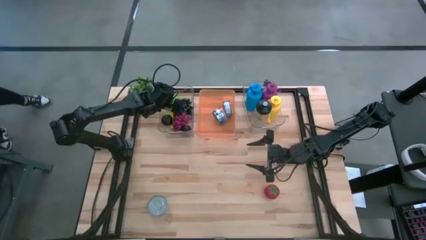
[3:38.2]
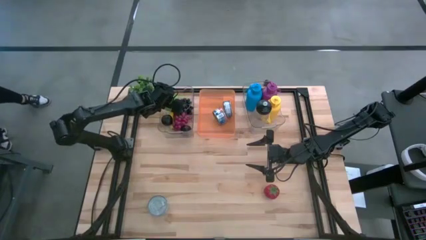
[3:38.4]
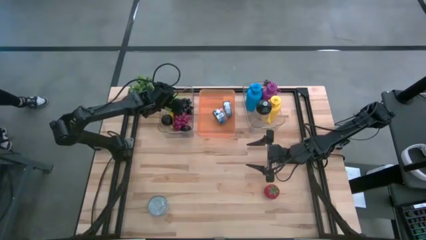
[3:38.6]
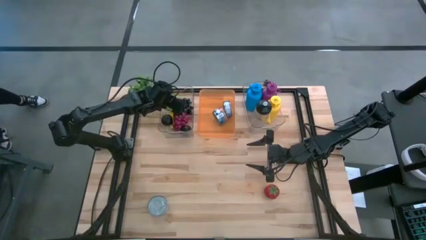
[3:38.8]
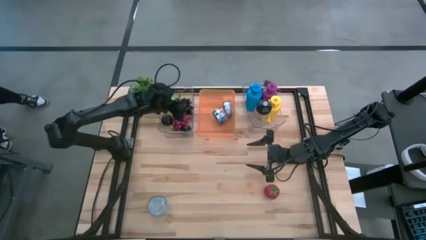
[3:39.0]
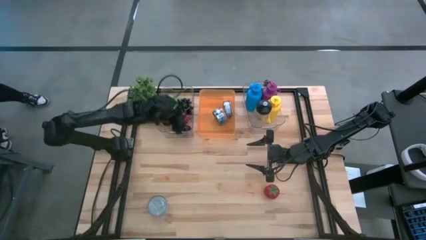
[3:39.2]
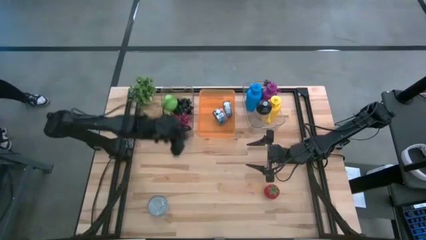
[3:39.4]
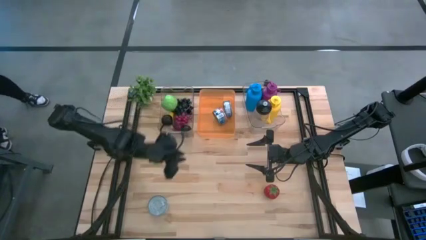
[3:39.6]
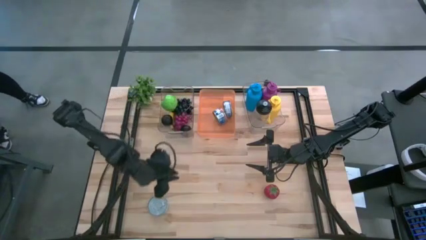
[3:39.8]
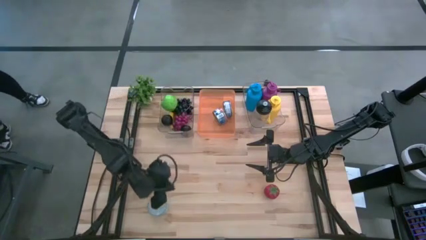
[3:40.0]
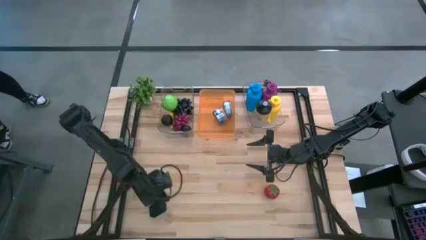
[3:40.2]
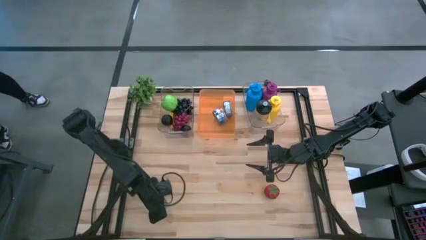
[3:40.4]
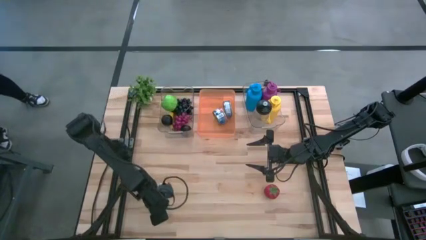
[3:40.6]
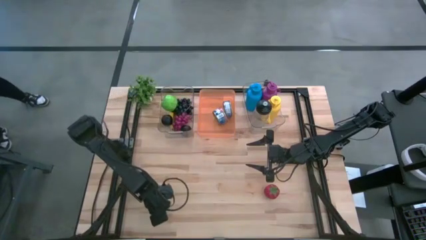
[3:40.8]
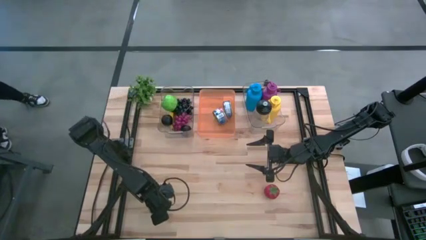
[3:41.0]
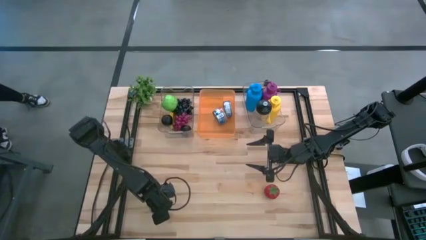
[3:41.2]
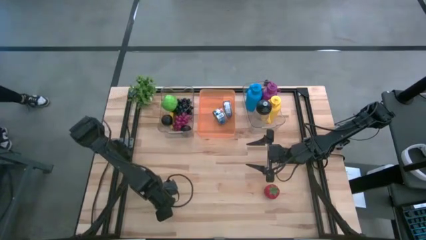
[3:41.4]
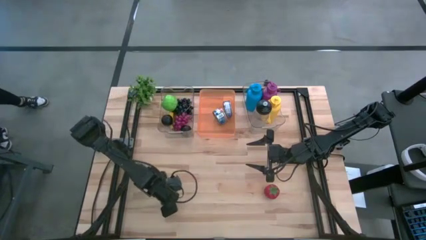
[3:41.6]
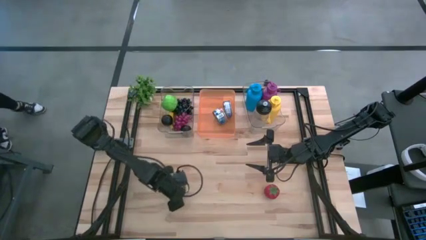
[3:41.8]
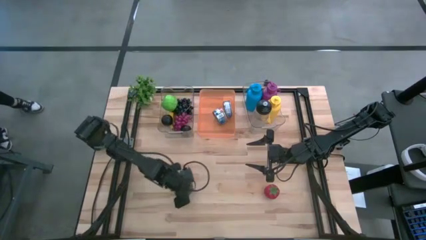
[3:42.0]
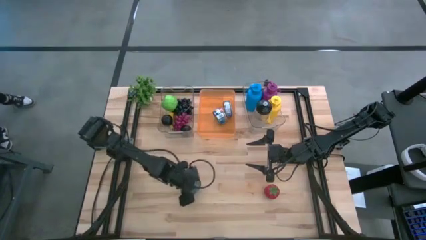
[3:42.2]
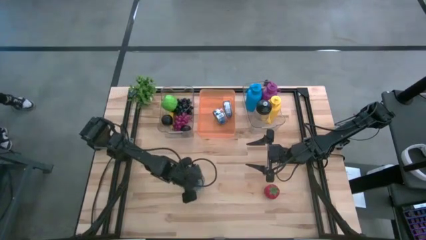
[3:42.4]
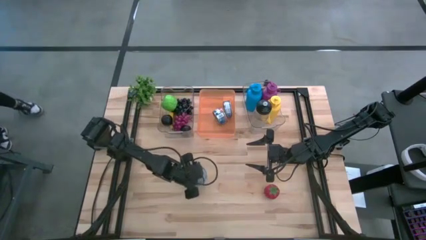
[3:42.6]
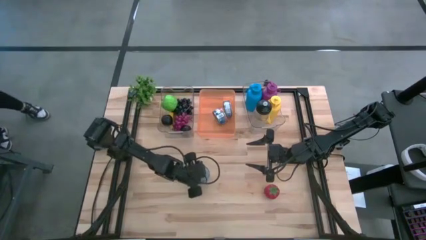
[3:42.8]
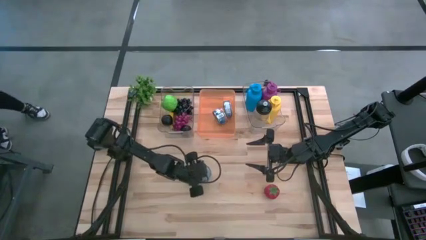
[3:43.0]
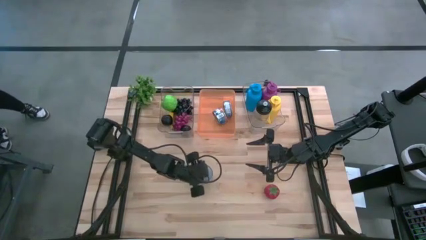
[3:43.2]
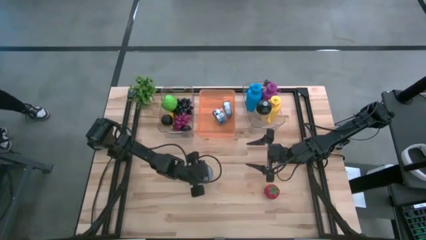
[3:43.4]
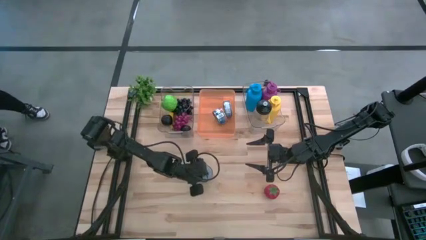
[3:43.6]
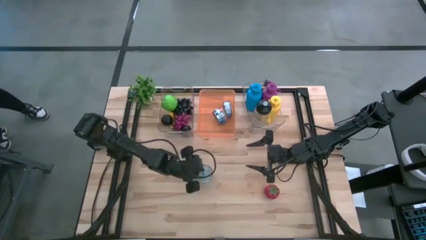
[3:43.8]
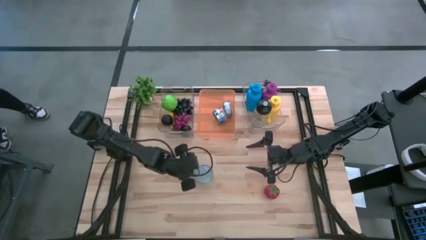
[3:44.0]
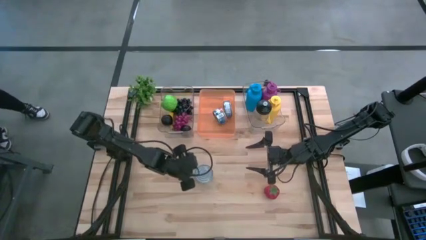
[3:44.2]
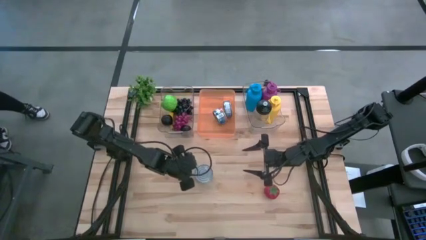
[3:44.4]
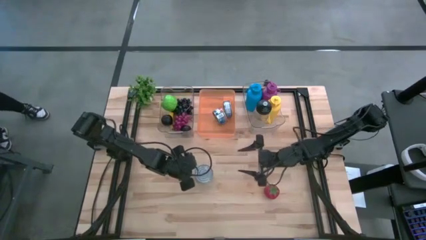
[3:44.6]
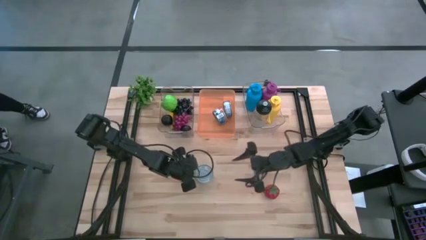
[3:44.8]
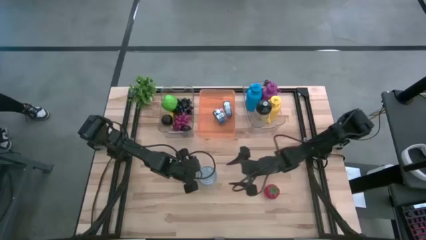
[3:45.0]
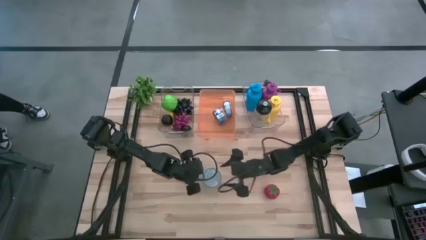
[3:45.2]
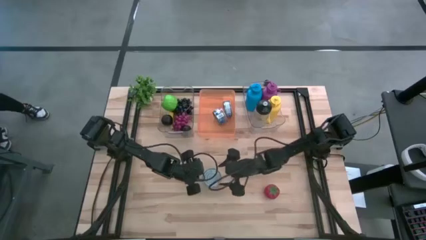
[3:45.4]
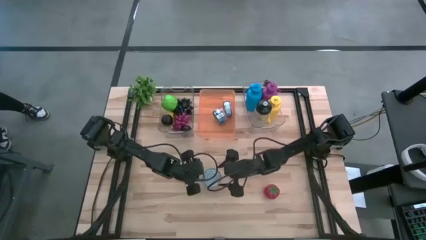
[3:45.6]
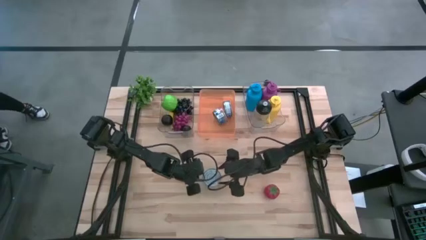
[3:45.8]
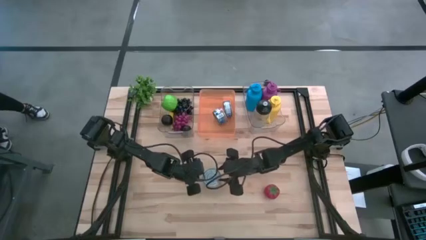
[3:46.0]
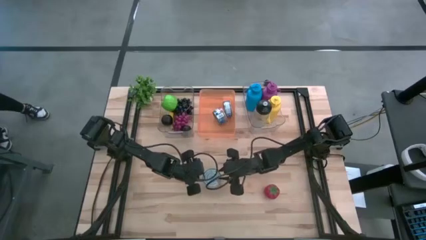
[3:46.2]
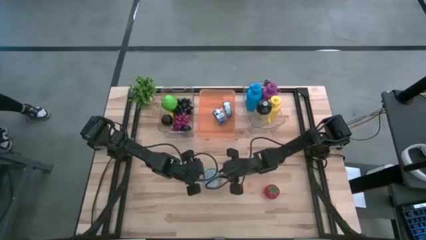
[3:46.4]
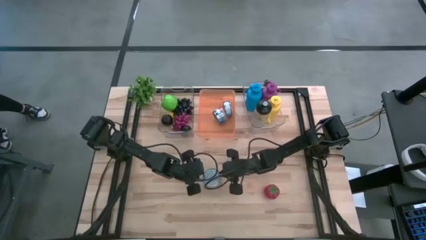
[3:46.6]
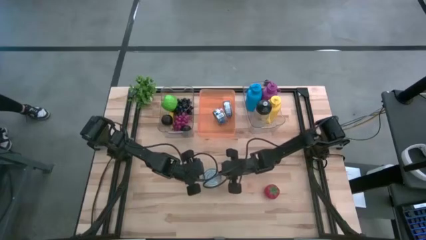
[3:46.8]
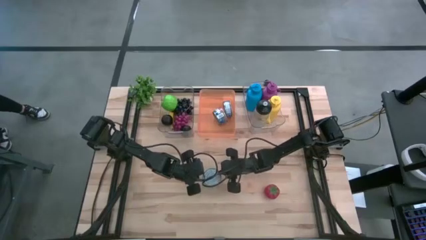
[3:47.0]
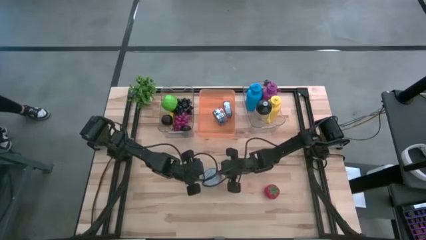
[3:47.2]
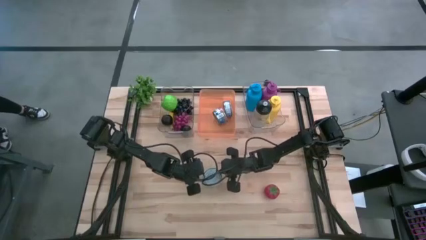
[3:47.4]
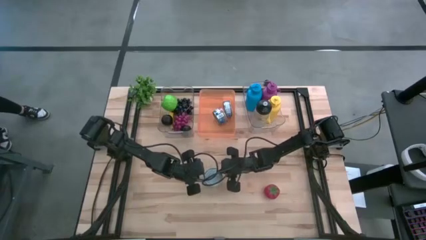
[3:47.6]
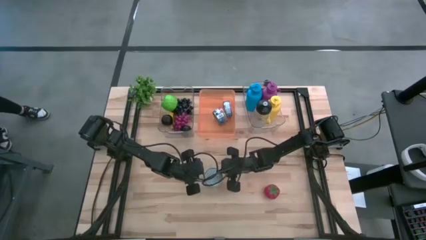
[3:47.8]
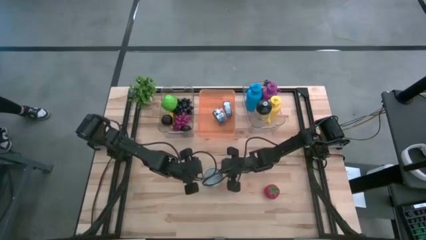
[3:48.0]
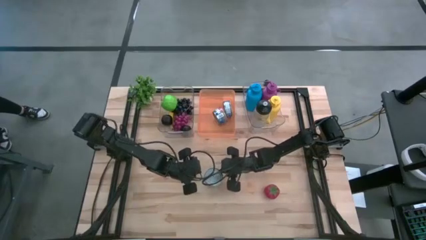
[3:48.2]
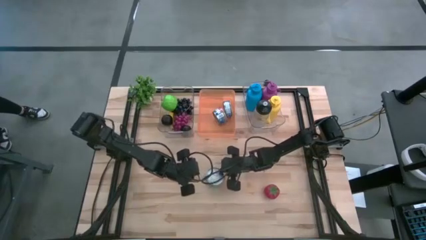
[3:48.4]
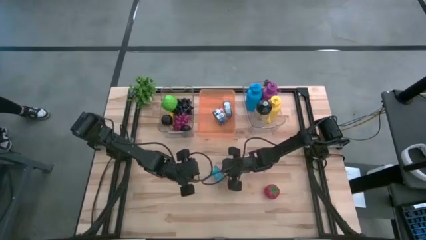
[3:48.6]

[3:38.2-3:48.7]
Task: Pick & Place Food Item
Put the yellow and blue tuna can into the orange bin

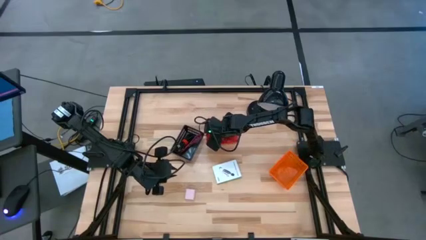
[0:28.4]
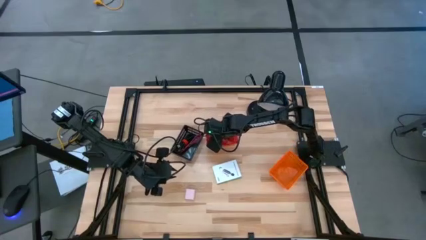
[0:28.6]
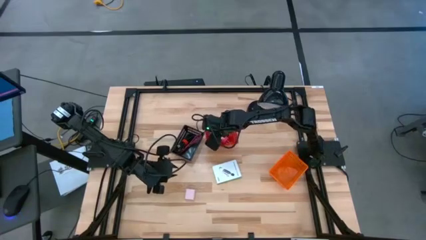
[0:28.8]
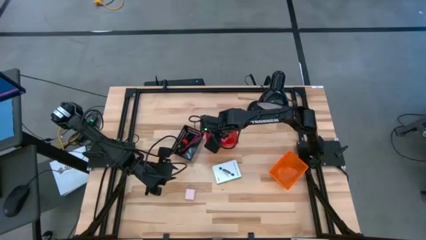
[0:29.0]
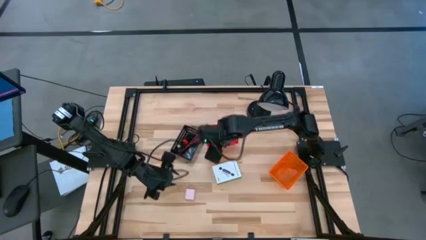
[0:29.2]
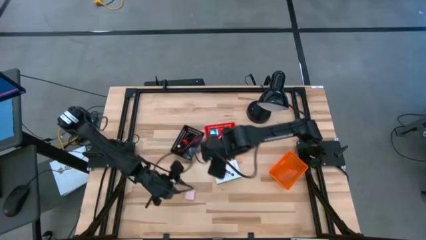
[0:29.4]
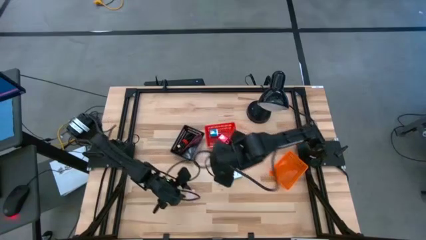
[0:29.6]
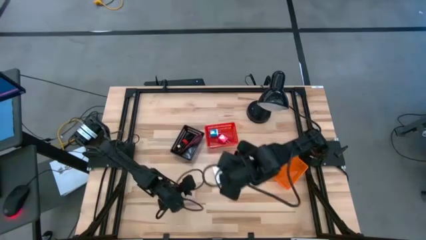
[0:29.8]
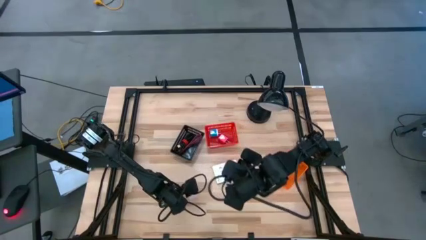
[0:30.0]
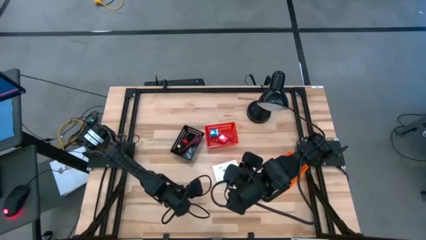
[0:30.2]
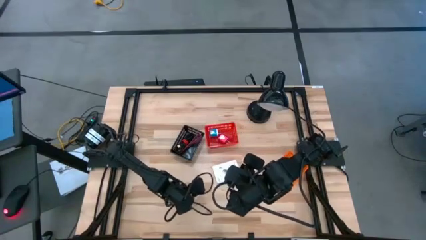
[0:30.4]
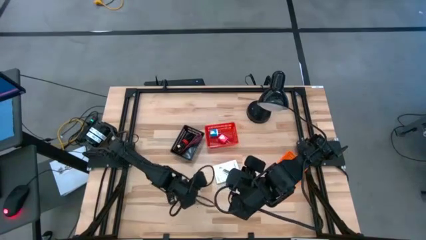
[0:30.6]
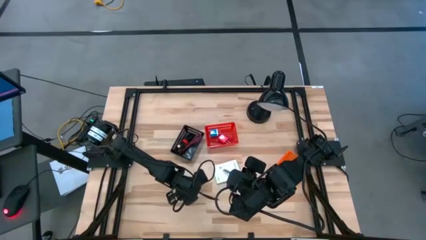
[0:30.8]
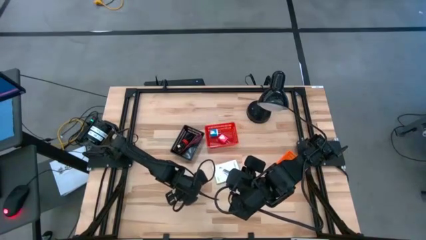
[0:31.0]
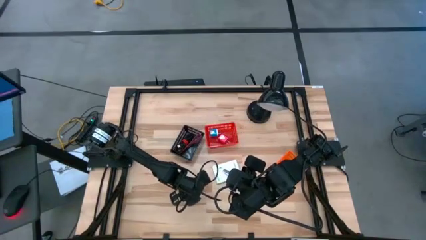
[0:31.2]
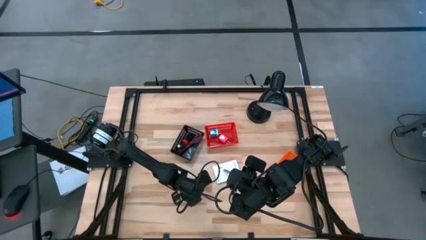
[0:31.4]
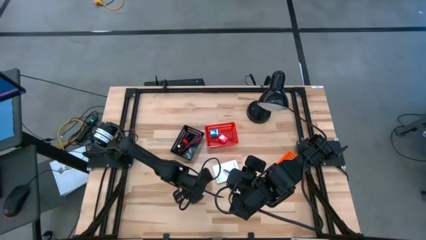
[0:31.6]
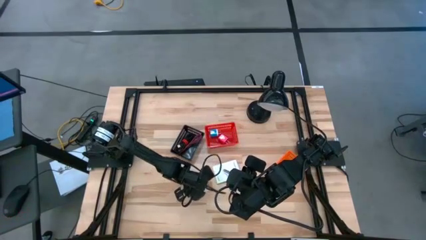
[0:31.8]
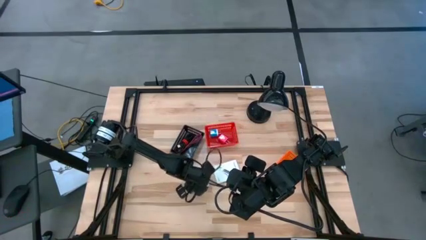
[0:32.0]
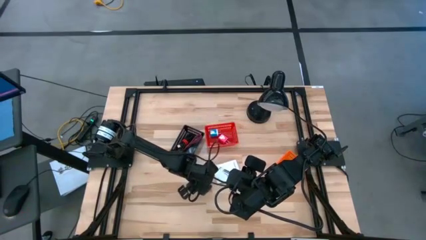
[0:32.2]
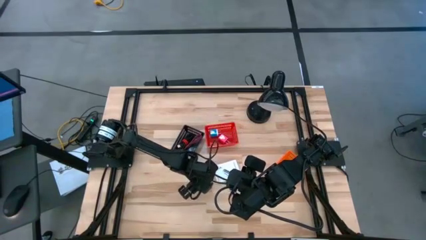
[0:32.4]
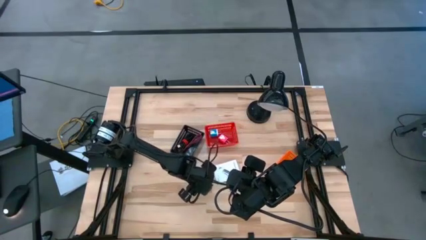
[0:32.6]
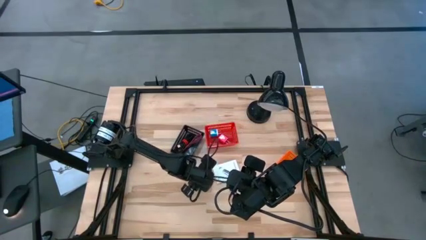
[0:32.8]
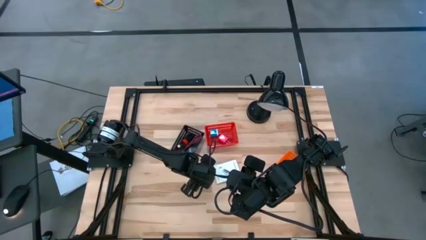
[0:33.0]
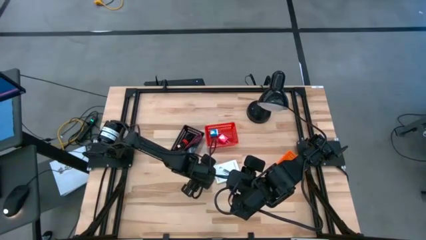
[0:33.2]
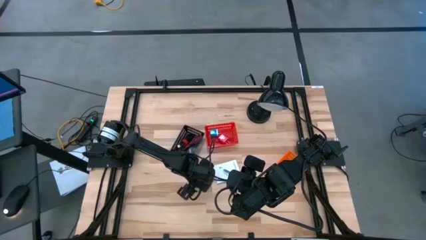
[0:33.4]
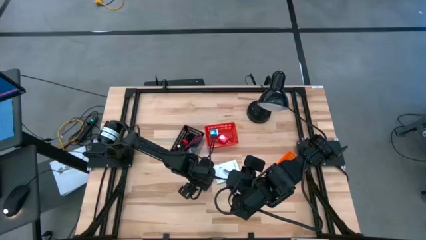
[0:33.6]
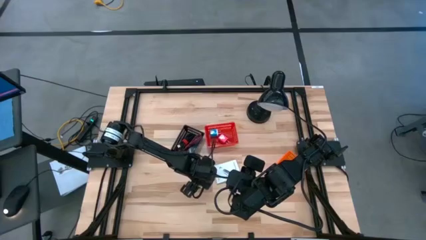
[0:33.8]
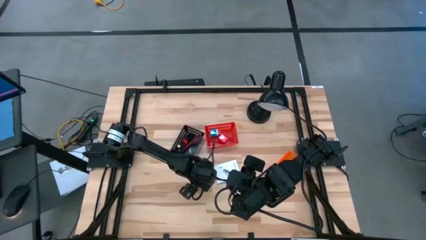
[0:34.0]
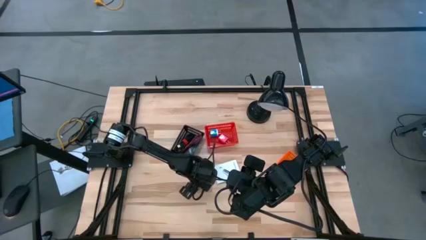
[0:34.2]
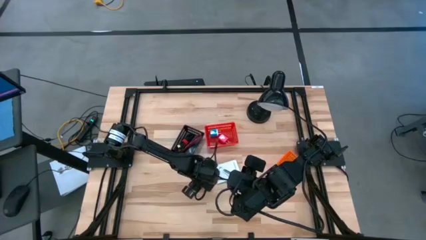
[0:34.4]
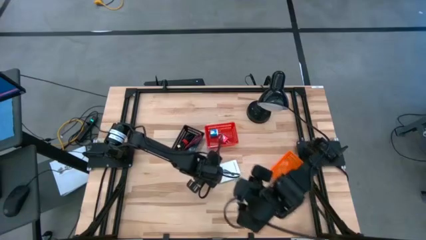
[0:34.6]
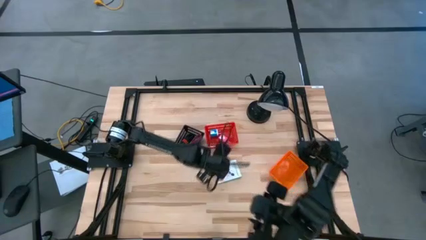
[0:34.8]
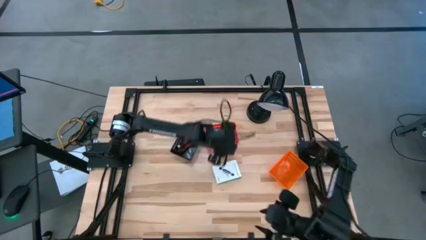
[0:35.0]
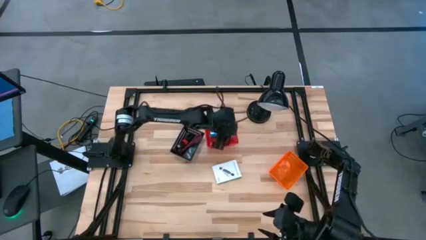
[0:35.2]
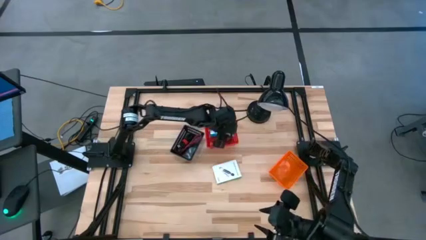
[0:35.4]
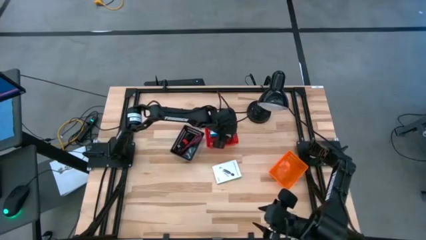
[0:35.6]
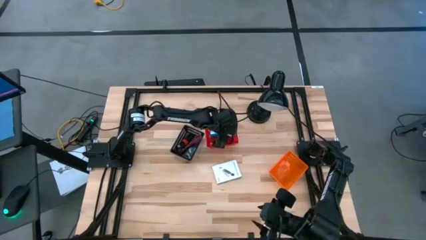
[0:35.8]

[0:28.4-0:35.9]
Task: Pick and place items into bin
Put the light pink charger adapter into the red bin
